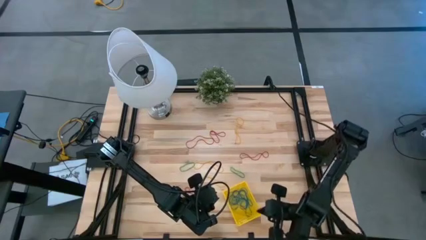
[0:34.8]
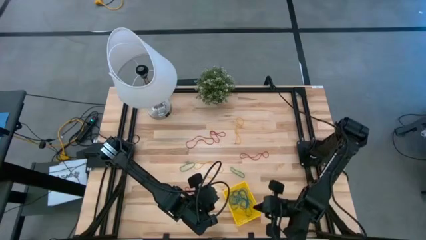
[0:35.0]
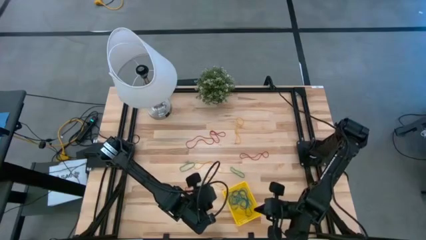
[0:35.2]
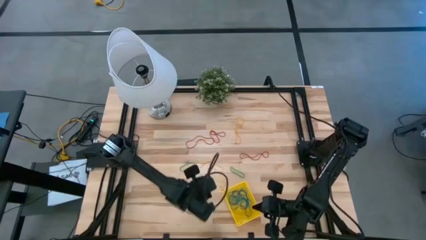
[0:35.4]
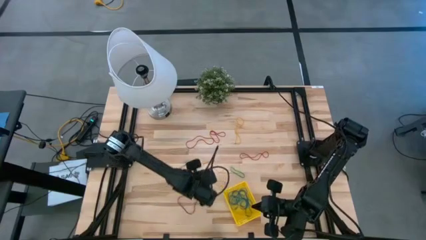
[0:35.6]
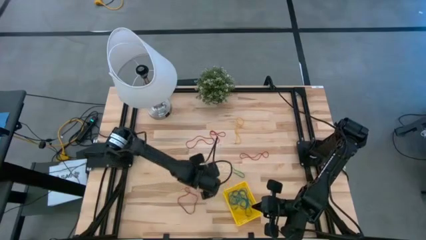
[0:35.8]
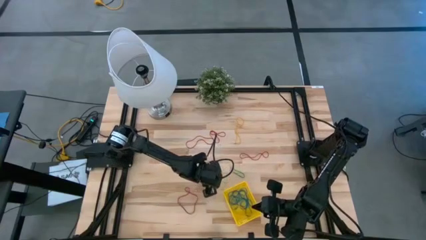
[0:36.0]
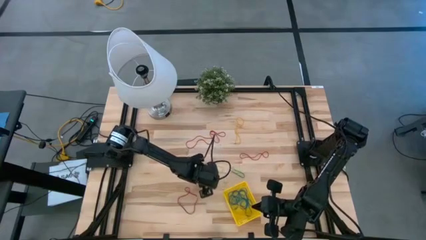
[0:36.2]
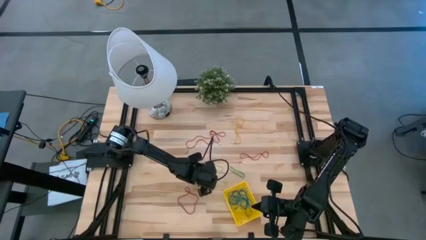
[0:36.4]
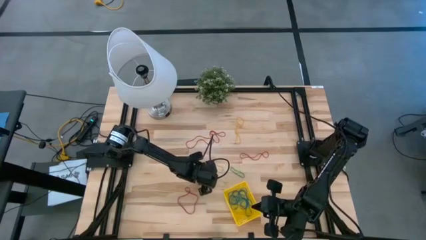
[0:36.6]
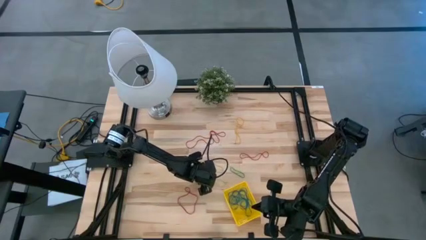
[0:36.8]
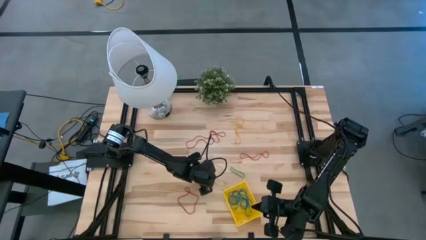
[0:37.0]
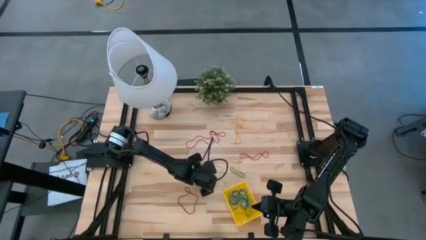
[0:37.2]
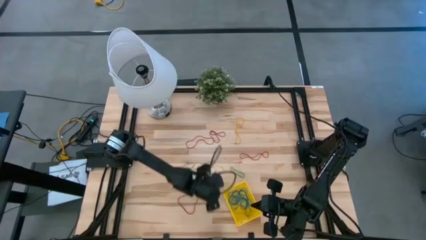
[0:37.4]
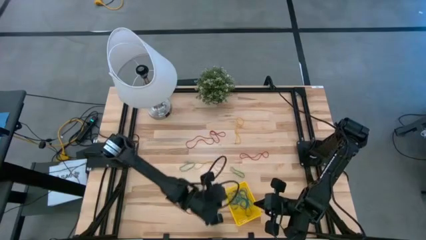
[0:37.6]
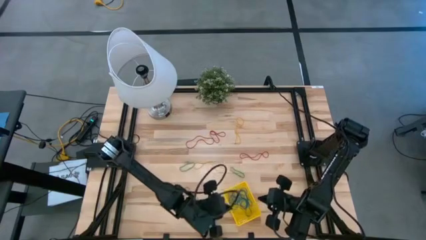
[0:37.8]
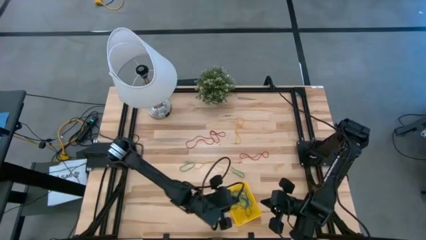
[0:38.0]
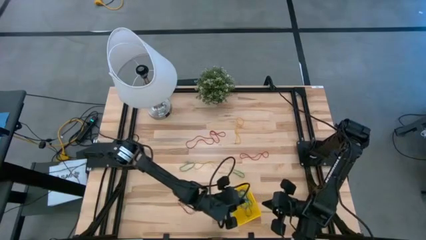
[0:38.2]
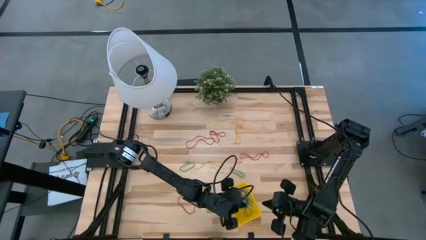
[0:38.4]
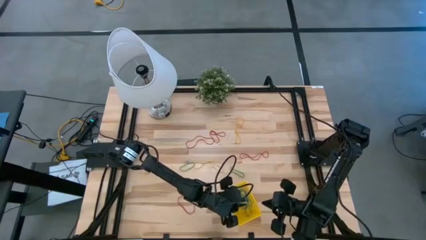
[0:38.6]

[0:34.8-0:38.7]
Task: Pick and place items into bin
Put the bottom yellow rubber band into the bin

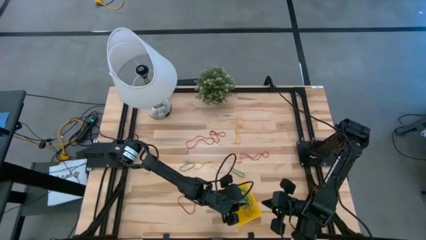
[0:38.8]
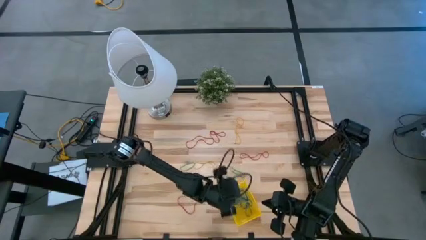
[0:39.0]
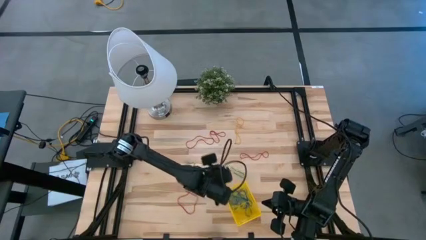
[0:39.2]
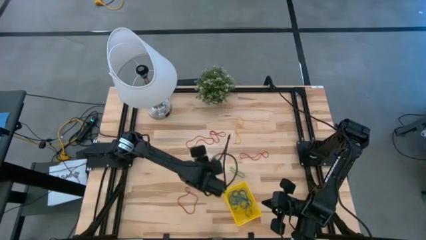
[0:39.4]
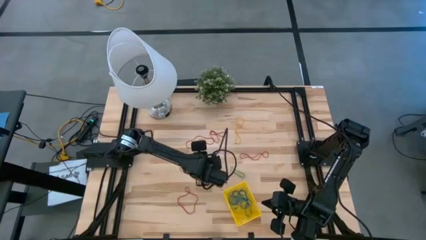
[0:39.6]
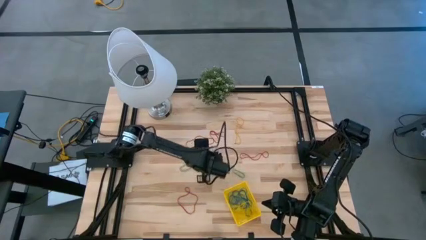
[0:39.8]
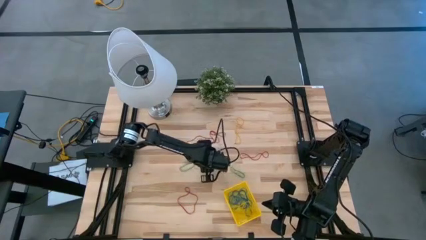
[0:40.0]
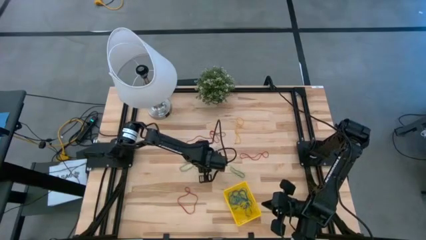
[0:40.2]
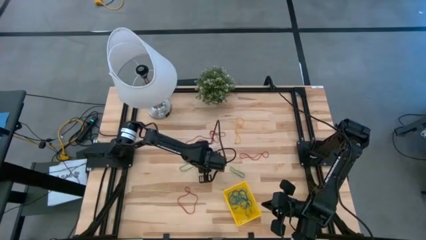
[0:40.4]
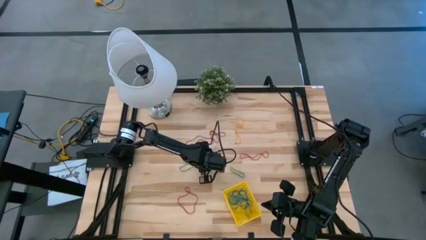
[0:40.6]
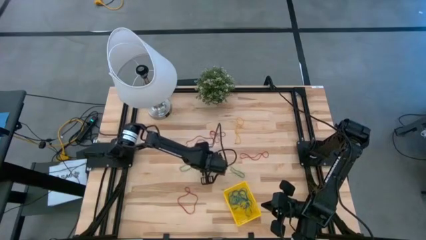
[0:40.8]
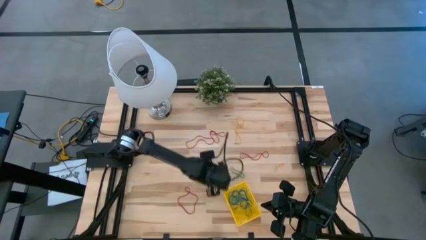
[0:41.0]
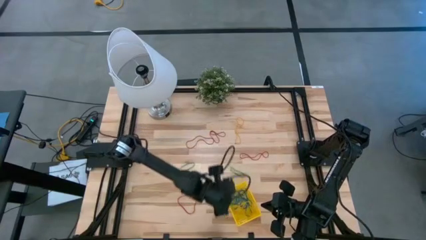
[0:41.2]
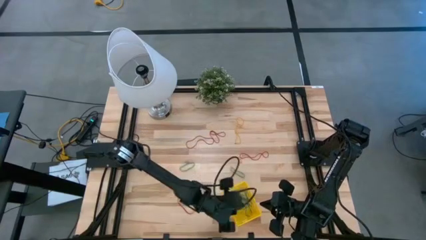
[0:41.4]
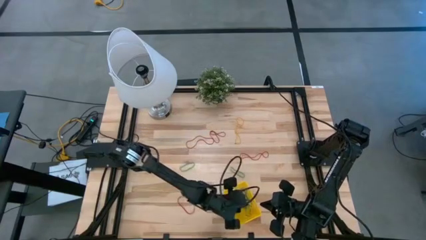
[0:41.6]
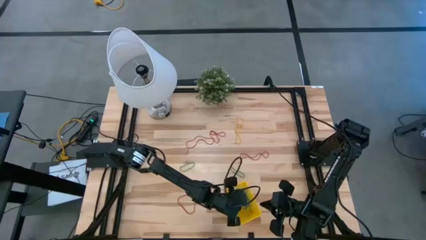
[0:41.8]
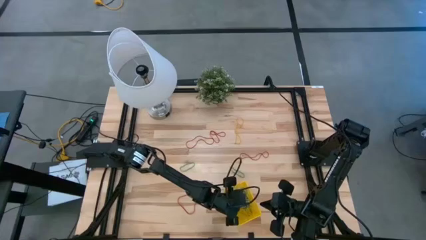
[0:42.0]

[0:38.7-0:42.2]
Put the bottom yellow rubber band into the bin

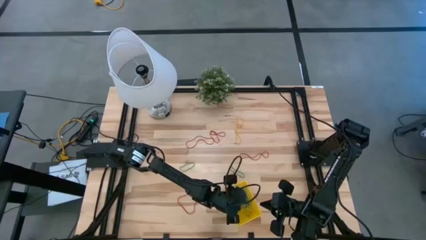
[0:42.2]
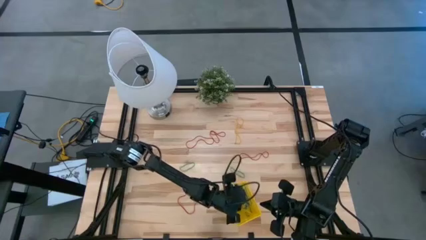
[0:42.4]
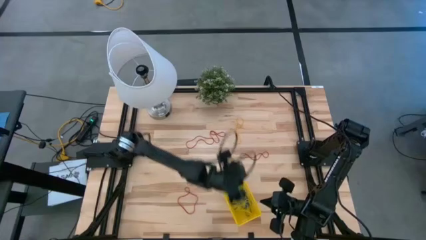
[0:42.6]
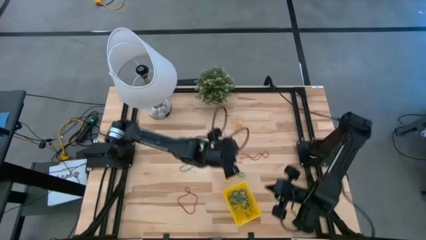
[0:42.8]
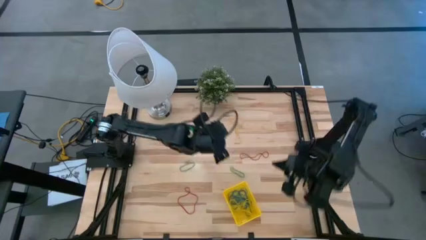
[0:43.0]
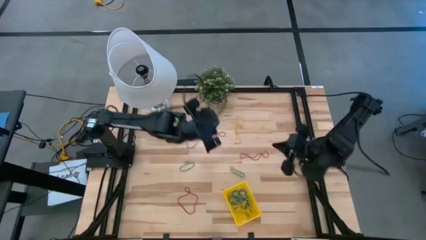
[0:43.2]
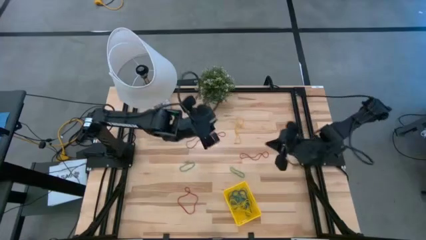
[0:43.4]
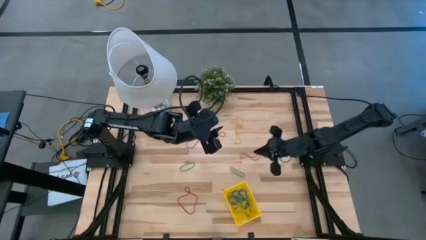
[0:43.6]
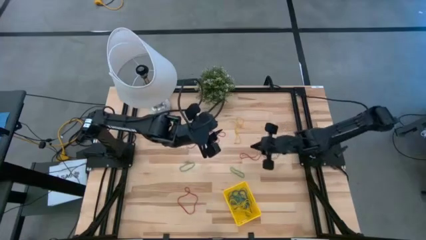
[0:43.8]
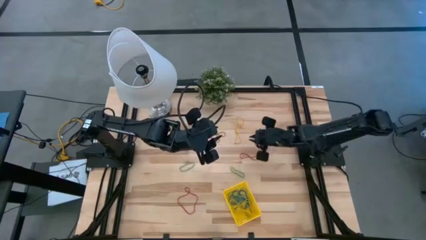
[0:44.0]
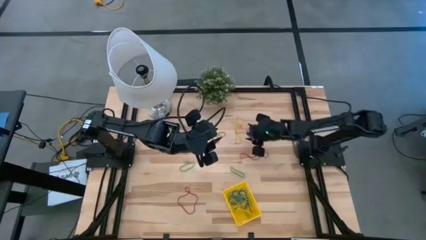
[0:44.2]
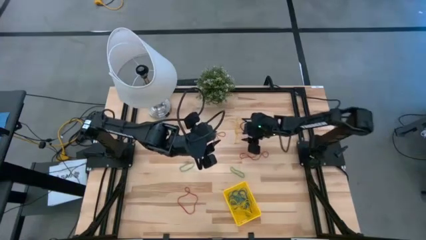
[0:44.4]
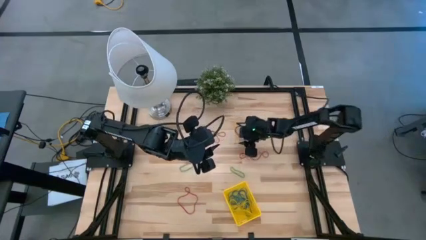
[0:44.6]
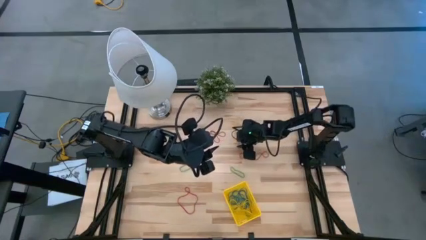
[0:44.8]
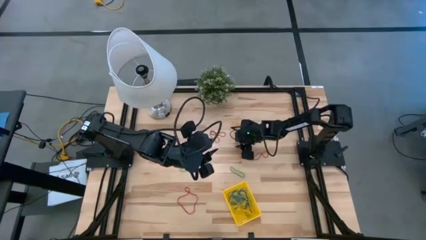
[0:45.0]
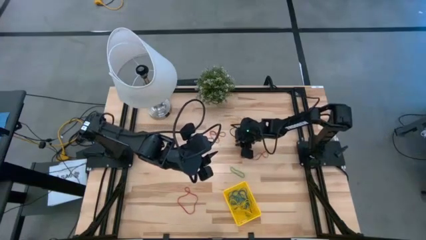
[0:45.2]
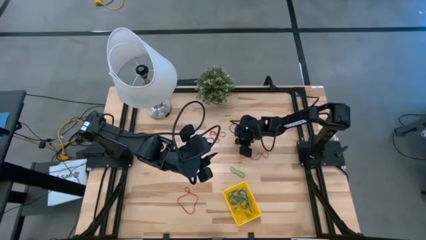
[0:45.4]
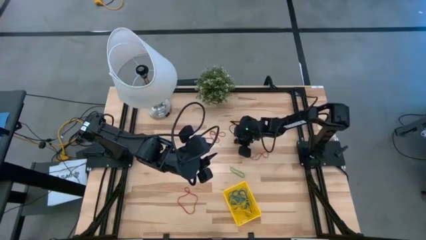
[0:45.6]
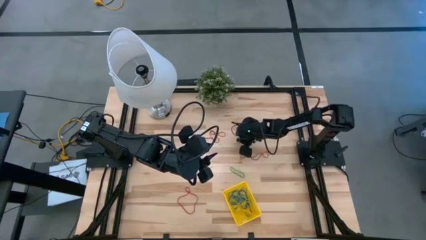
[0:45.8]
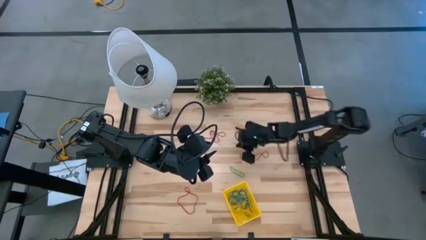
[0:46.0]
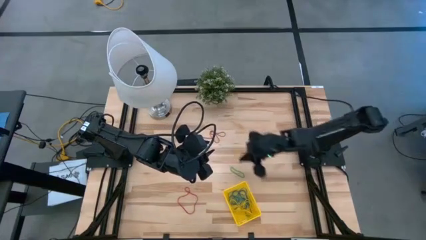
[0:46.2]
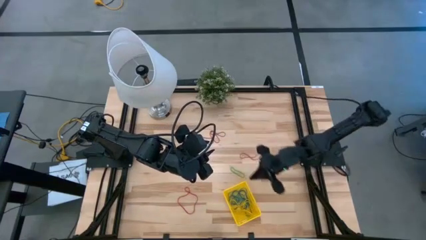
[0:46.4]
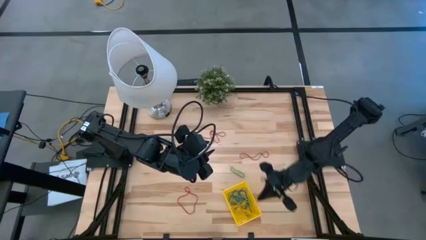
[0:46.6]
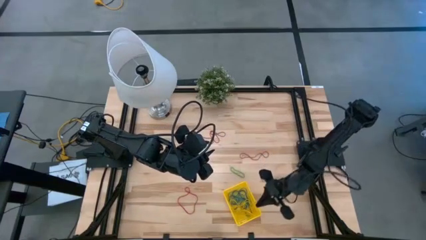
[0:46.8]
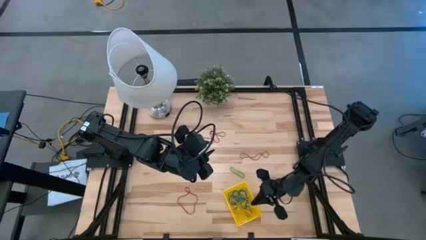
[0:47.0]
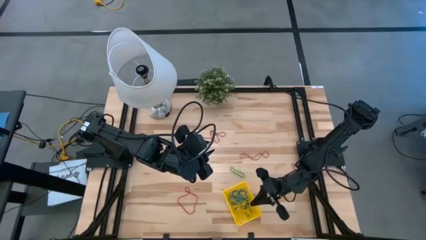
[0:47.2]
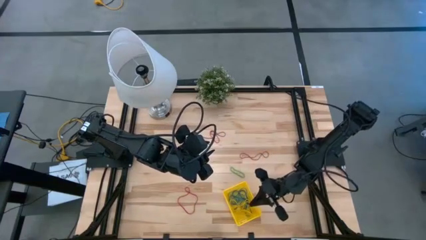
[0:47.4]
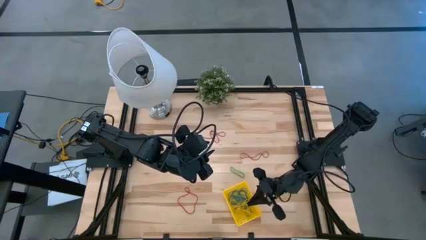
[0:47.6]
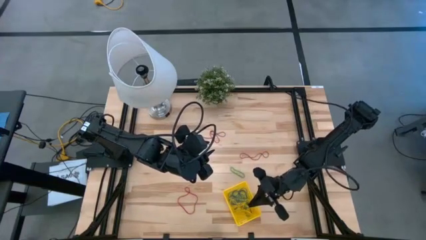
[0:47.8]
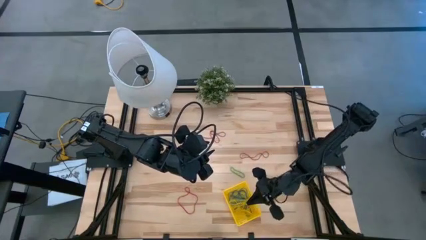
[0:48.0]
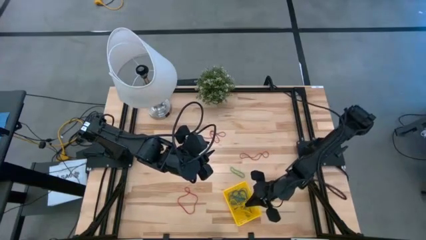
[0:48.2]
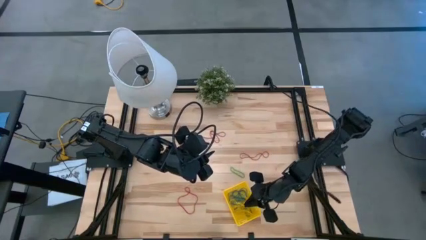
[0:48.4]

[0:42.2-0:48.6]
Put the yellow rubber band into the bin

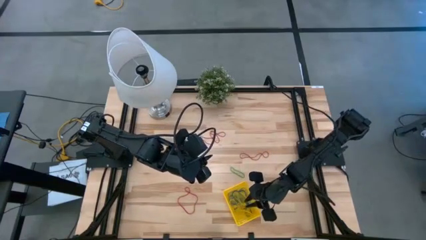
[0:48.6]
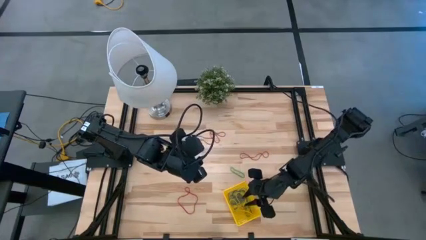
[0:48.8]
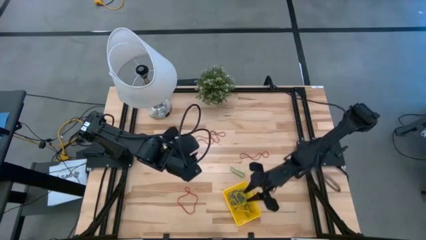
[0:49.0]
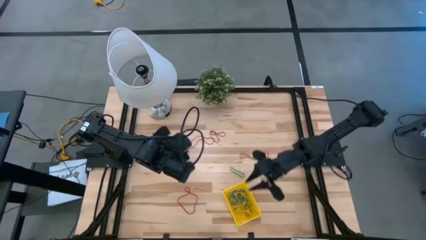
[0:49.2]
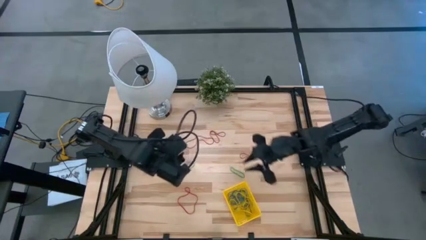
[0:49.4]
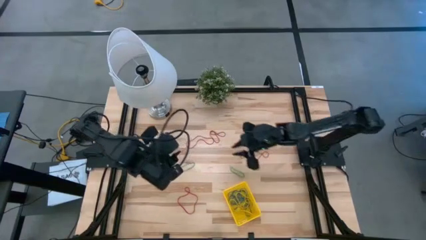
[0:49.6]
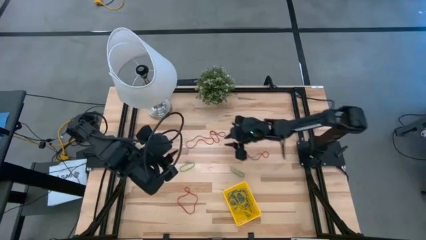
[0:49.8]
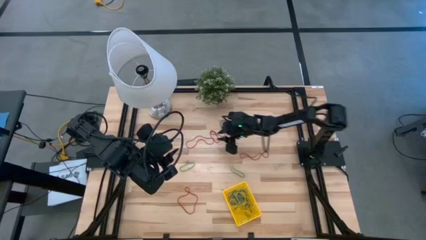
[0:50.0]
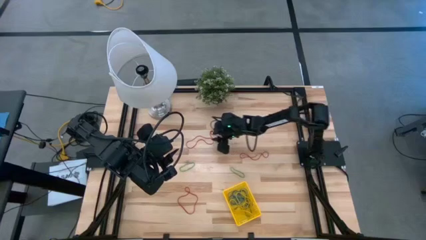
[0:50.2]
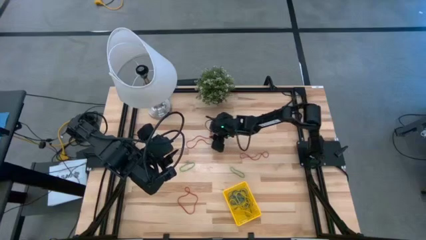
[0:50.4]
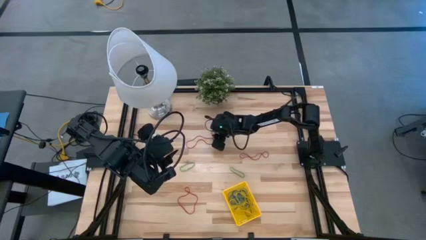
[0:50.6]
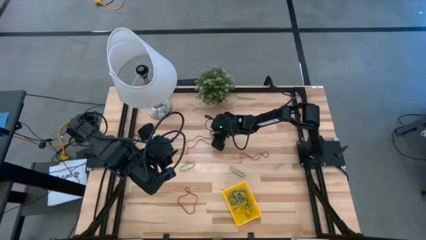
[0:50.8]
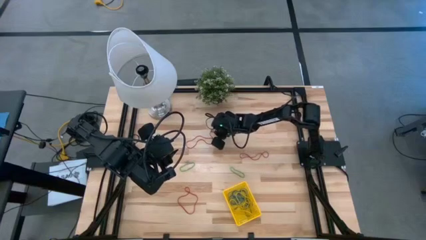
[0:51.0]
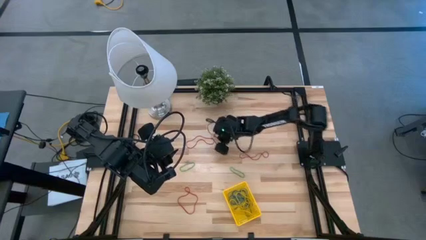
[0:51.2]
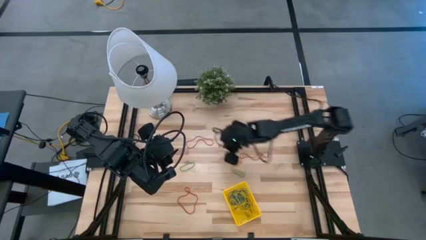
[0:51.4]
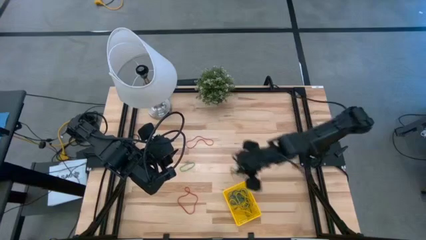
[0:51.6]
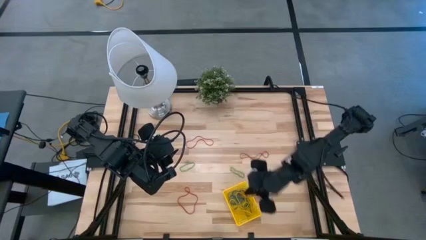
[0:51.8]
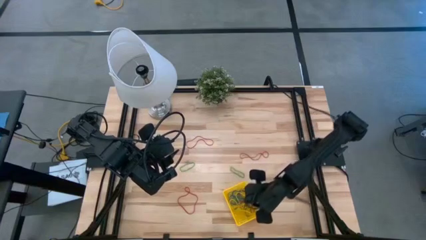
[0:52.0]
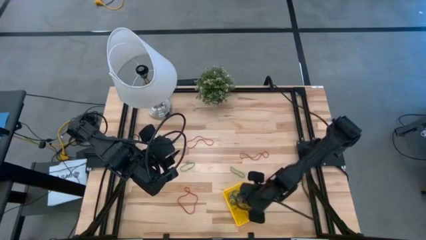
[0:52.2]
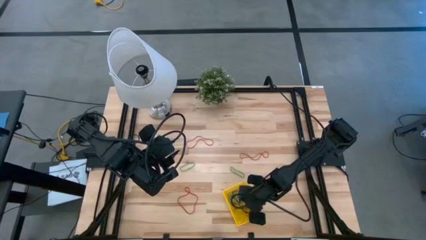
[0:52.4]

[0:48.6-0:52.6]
Put the red rubber band into the bin
